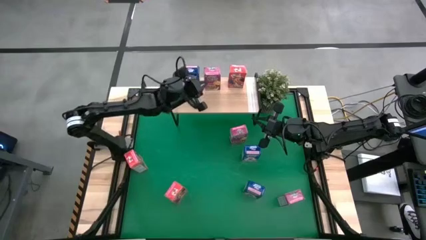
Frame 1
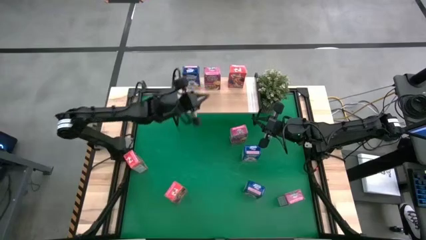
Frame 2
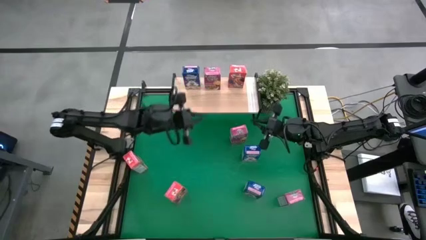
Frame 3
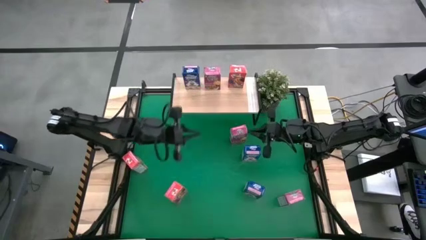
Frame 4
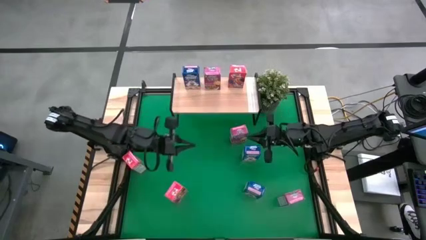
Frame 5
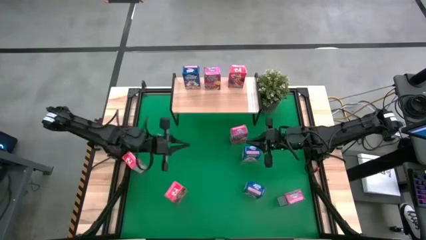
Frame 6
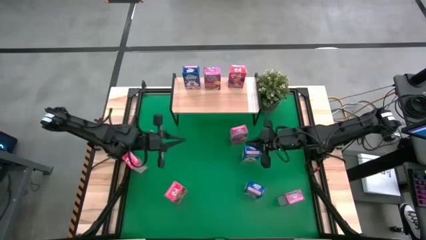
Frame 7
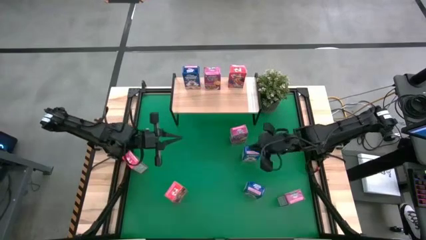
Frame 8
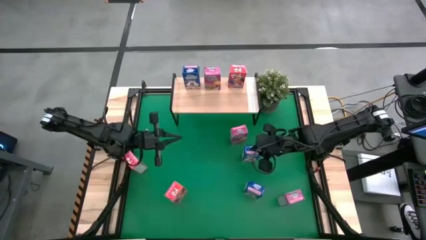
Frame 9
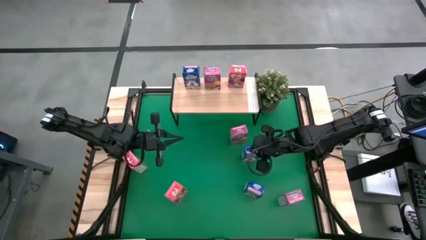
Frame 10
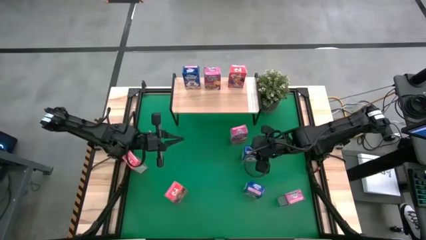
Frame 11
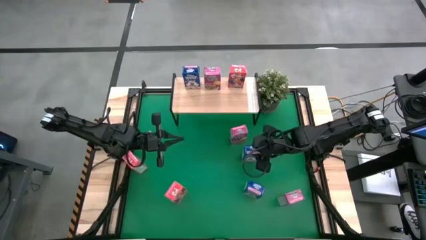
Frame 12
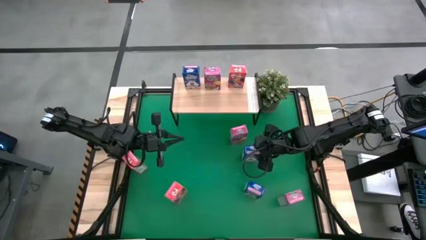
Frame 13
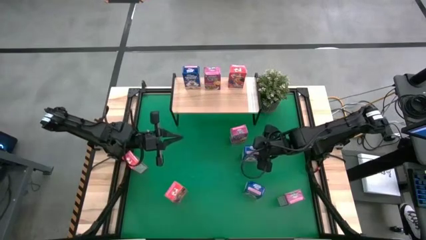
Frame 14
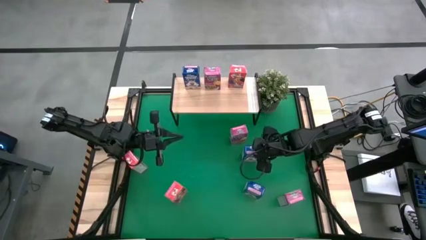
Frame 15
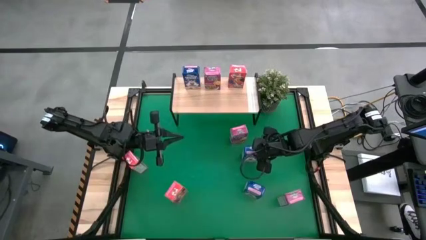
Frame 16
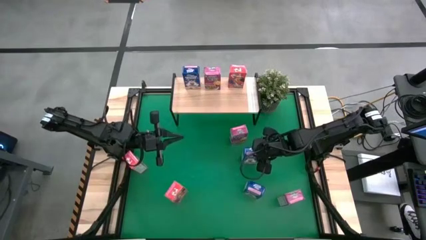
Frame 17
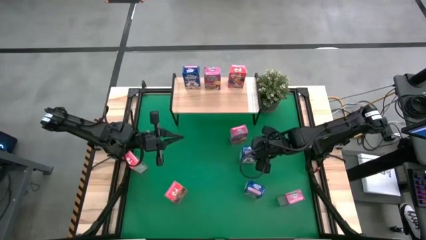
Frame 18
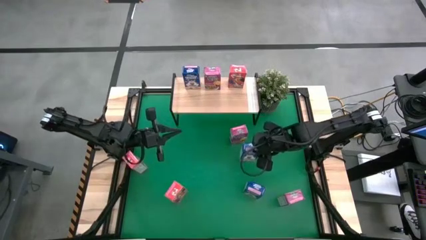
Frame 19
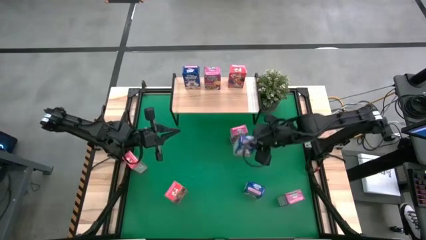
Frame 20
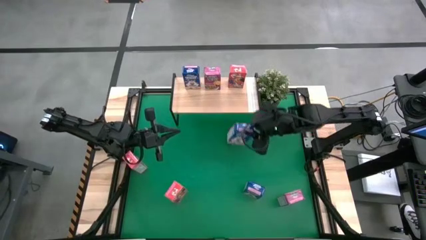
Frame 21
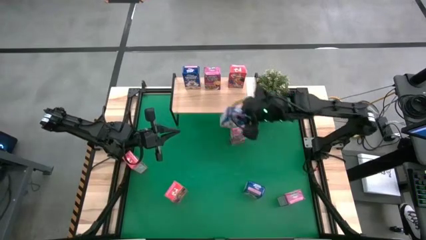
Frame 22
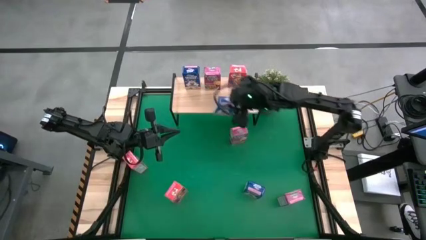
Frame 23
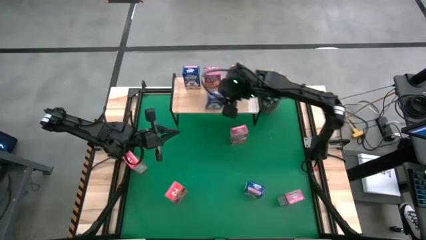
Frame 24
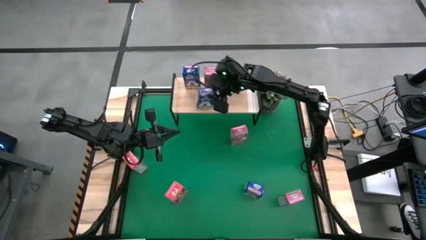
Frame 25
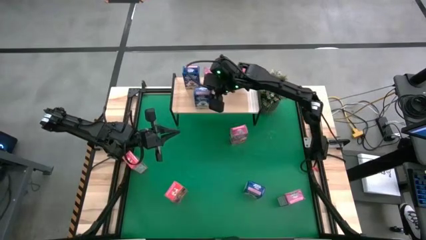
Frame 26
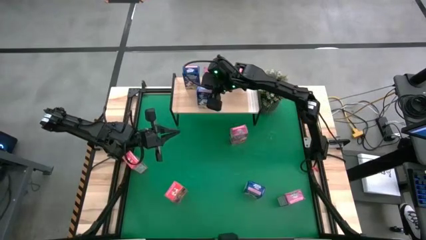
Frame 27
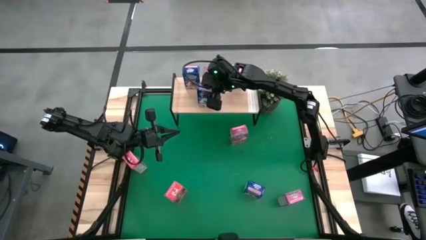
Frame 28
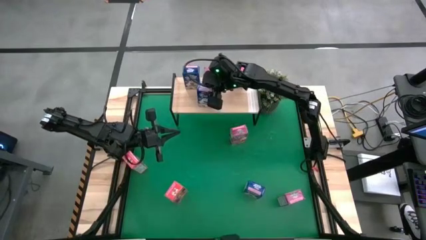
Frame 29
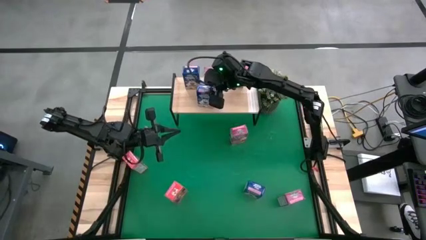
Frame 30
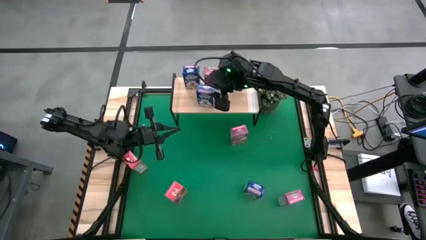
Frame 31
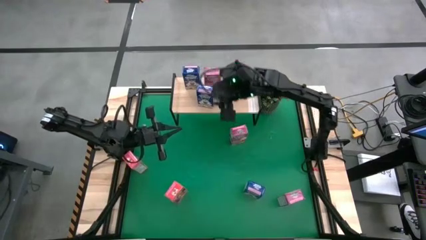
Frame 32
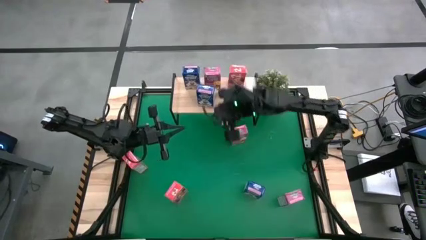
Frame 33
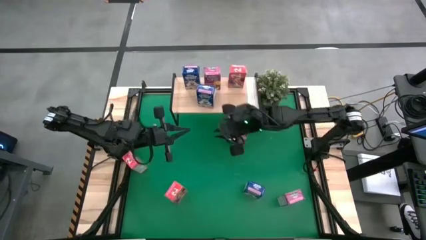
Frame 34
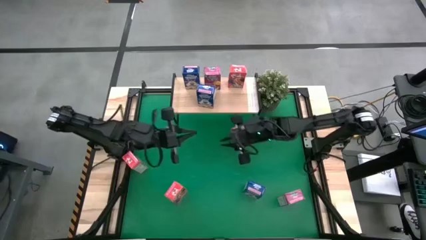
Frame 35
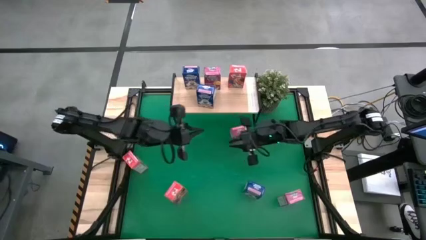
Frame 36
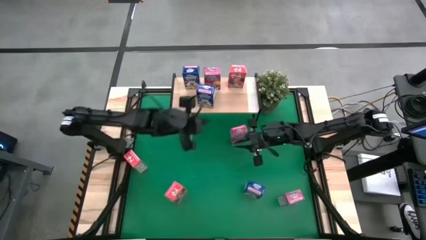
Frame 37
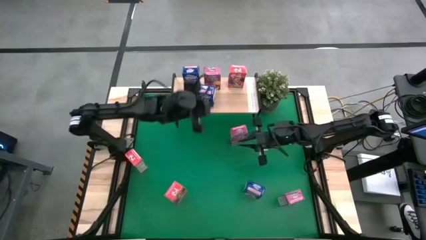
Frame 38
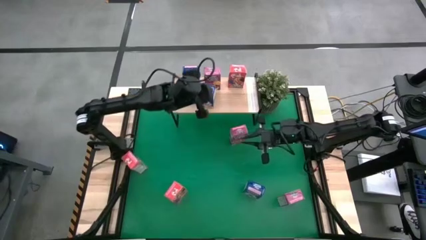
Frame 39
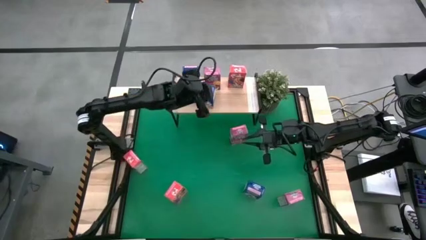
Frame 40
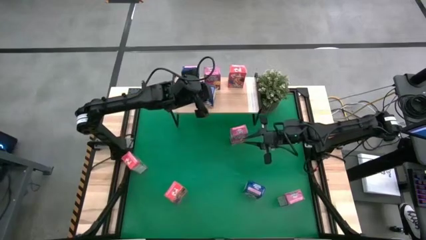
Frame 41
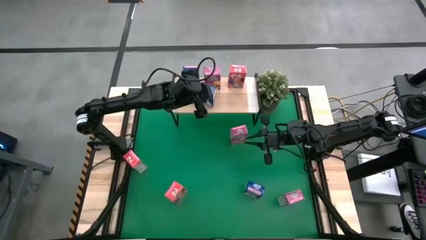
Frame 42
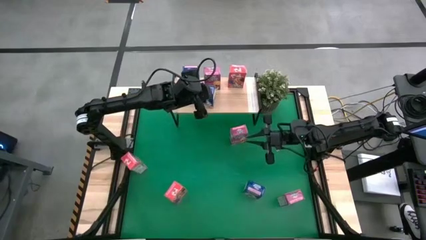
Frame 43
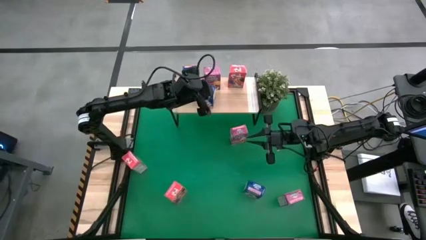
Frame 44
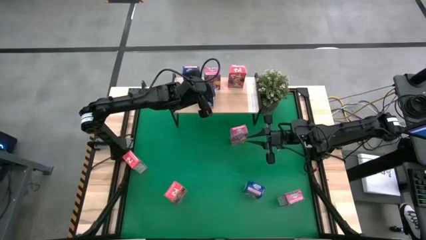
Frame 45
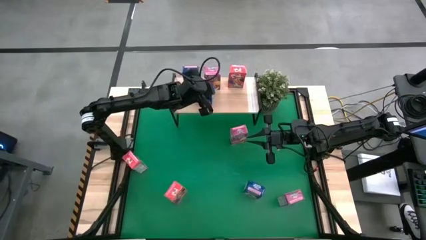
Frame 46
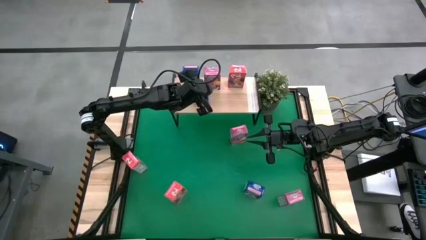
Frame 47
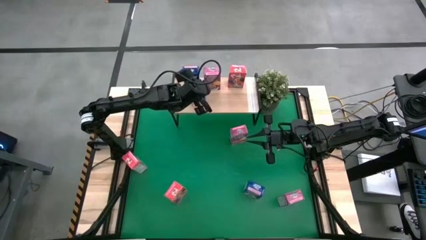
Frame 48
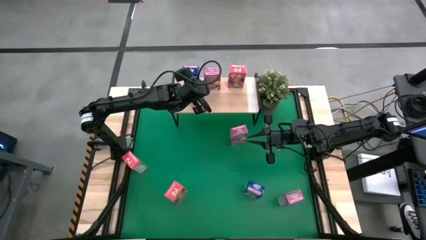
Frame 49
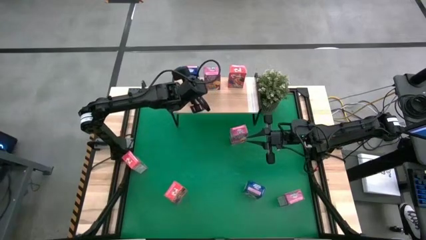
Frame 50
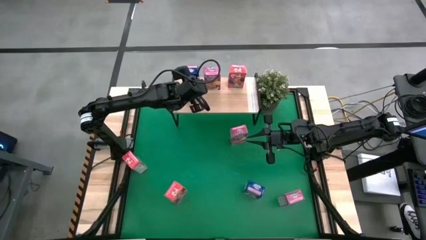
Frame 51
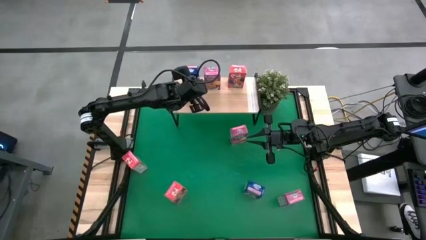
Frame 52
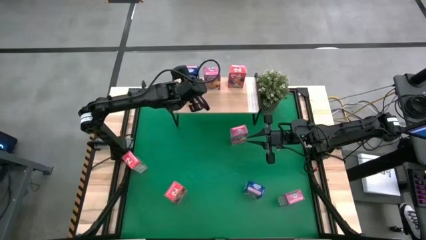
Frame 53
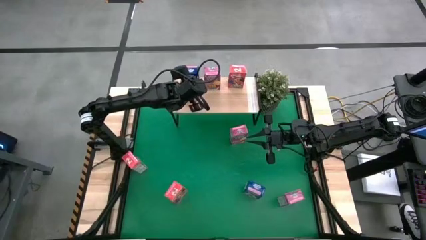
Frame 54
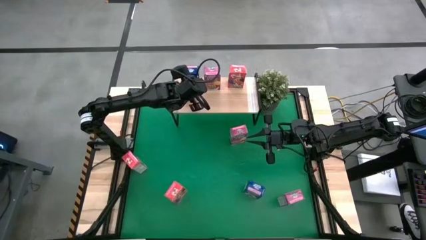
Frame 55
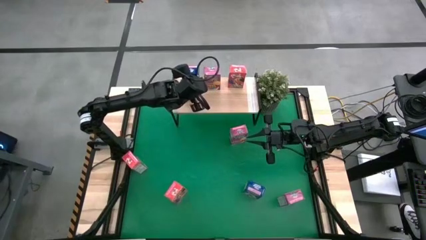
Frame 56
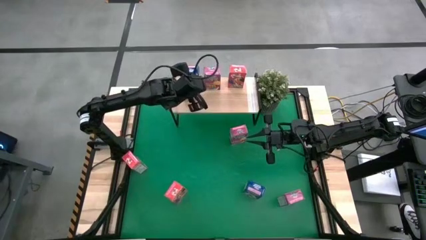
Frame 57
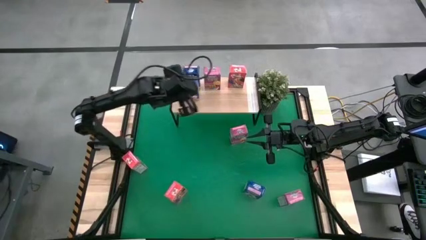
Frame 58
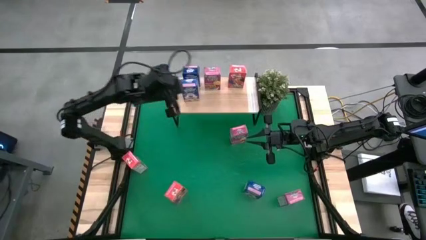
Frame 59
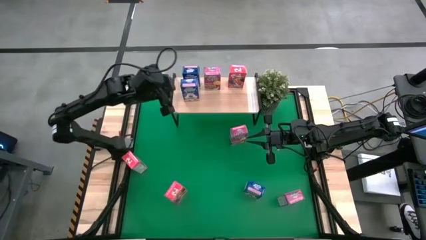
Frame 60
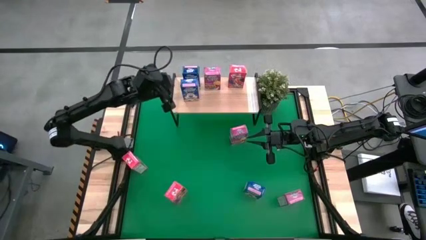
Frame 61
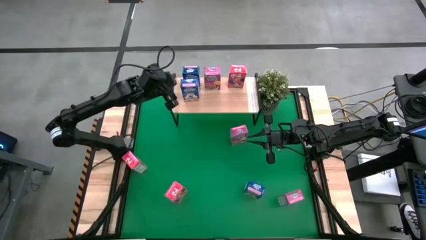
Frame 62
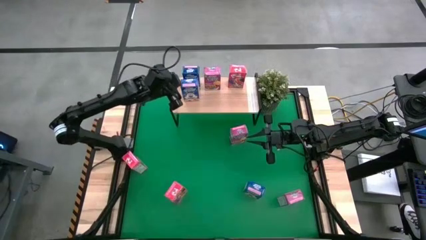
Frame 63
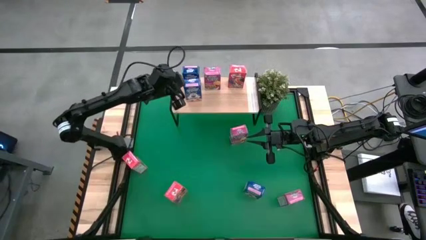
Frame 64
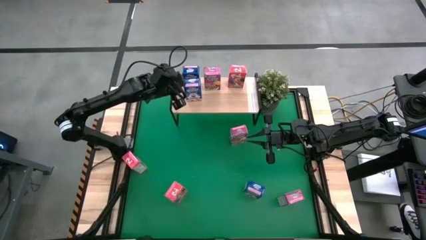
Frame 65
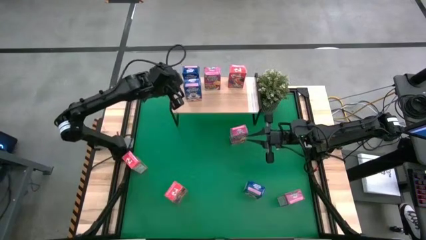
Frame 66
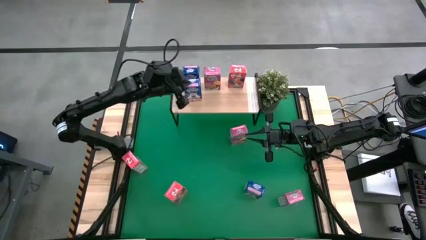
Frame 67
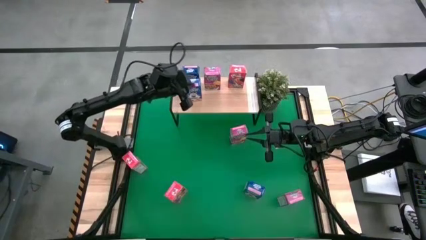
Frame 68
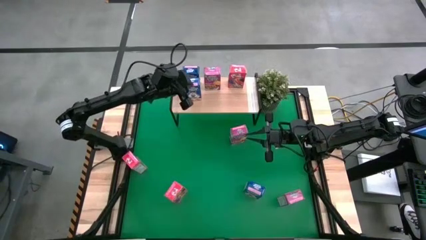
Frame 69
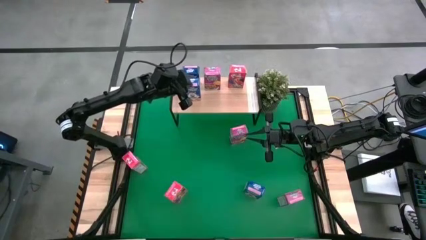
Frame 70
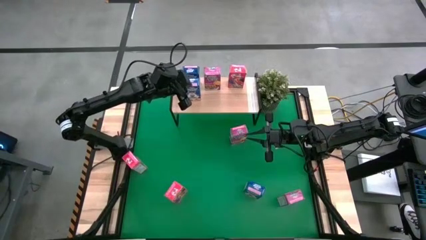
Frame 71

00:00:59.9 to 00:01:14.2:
Task: Stack cereal on shelf
Put the top blue cereal box on the shelf aligned with the blue cereal box

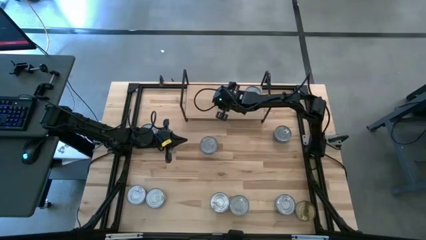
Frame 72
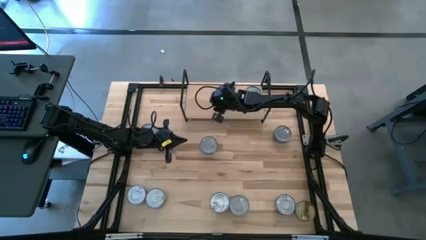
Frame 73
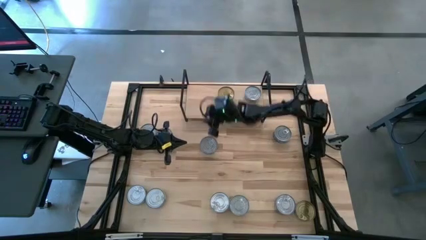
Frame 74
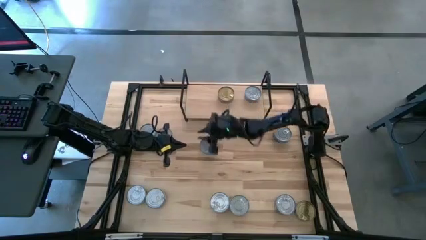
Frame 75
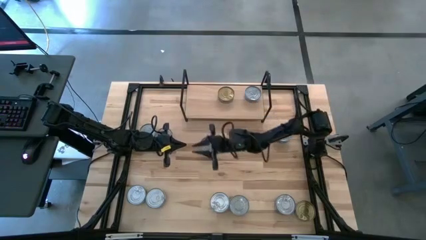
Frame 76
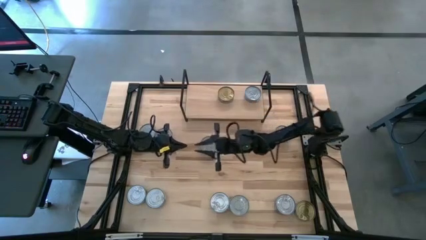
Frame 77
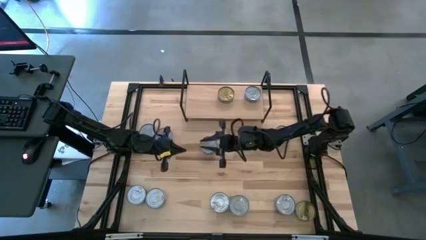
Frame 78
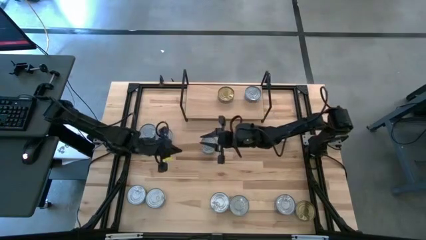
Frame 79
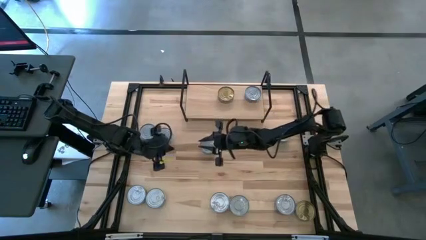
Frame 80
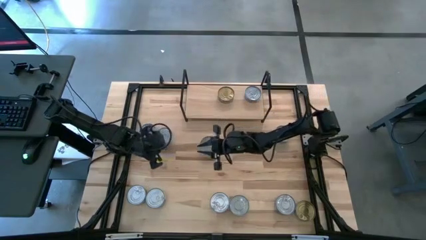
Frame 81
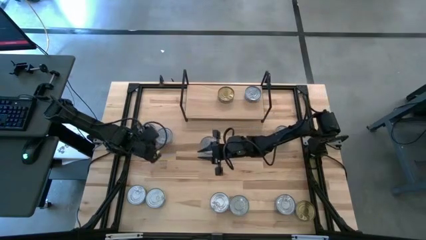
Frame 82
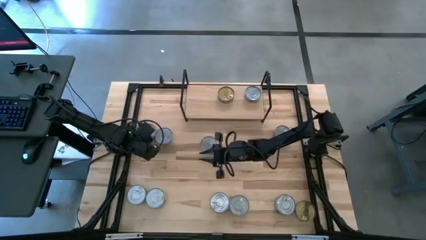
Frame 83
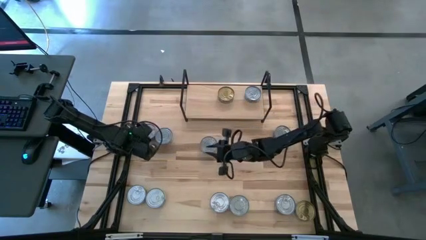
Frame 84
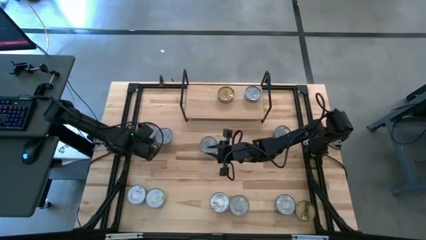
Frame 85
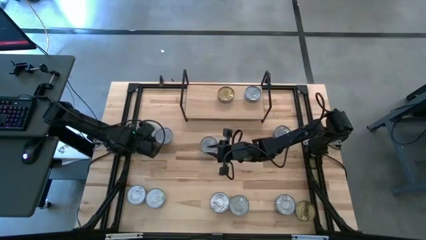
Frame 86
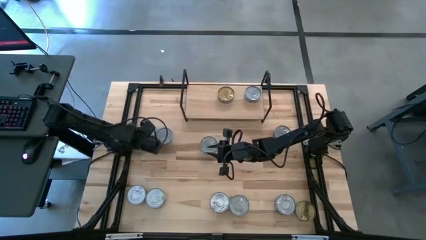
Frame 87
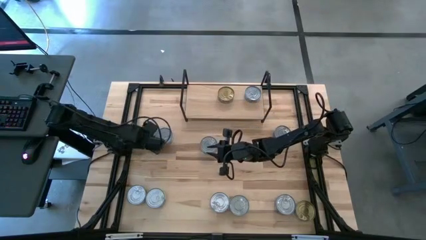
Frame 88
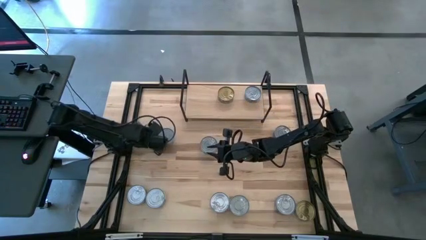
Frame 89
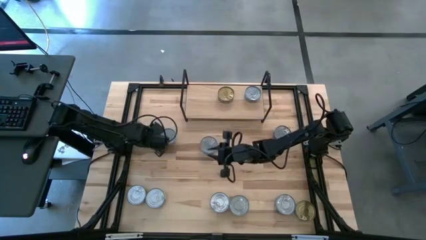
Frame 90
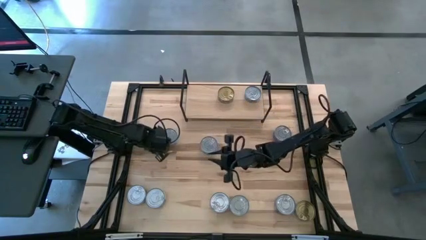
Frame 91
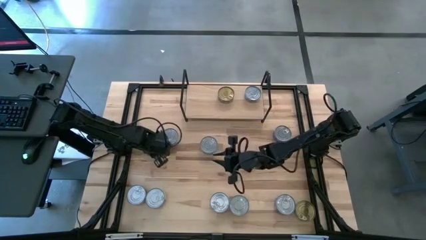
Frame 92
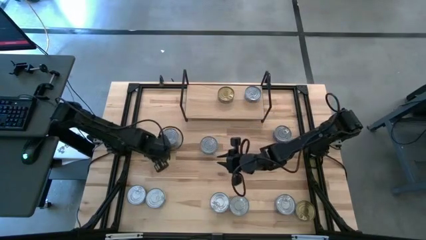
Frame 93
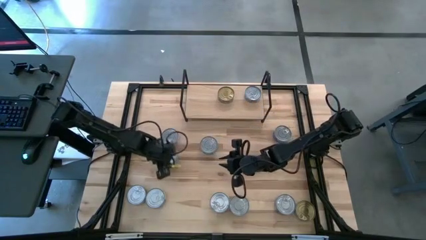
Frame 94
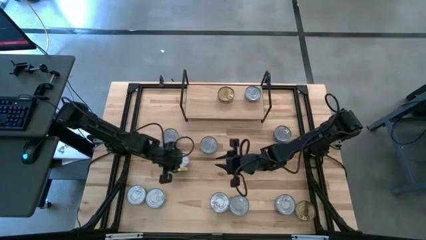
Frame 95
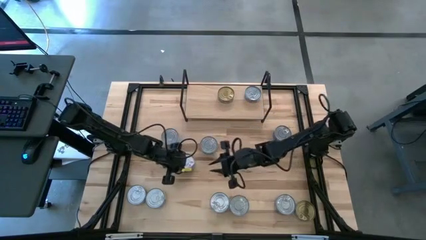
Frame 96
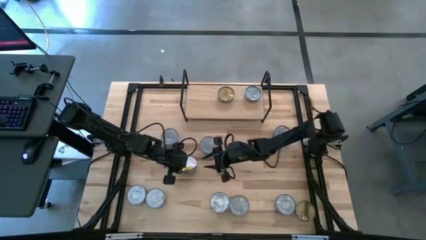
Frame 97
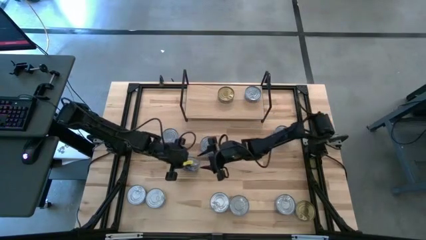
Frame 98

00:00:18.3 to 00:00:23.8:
Task: Stack canned seafood by type on shelf
Put the top left blue tuna can on the shelf
